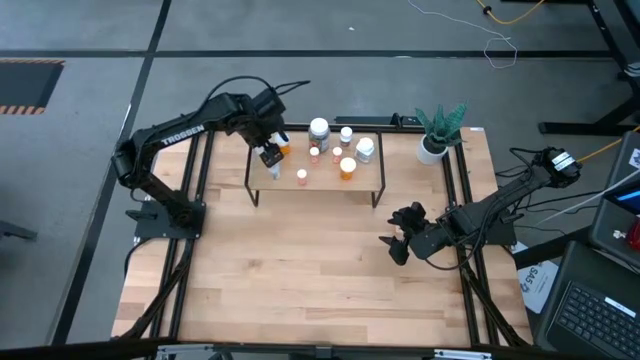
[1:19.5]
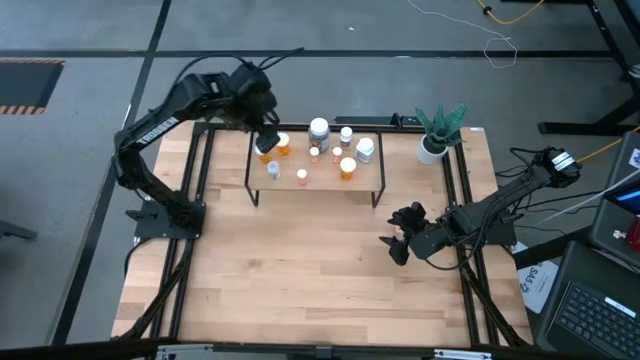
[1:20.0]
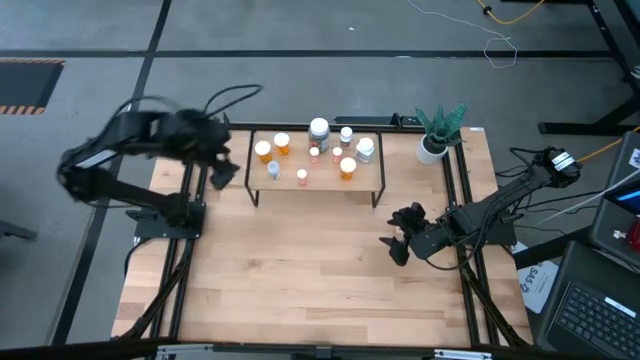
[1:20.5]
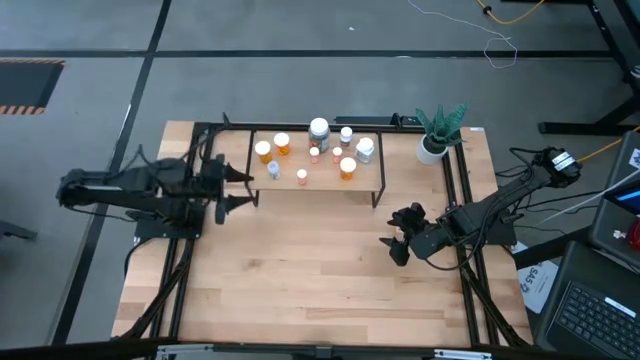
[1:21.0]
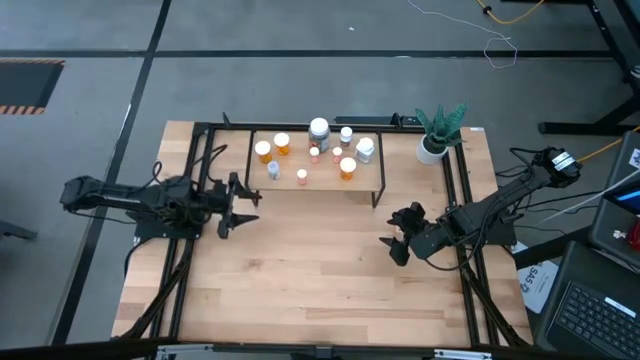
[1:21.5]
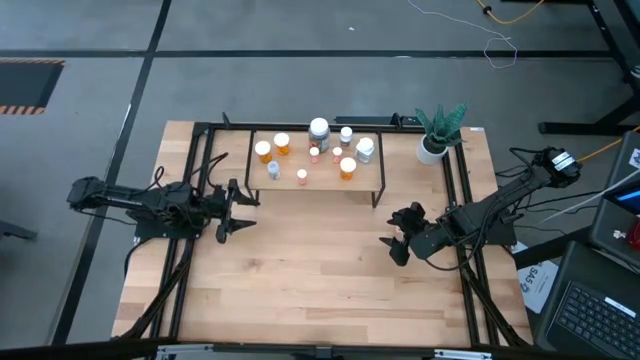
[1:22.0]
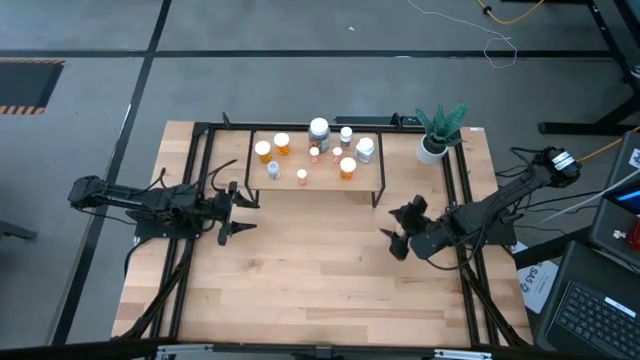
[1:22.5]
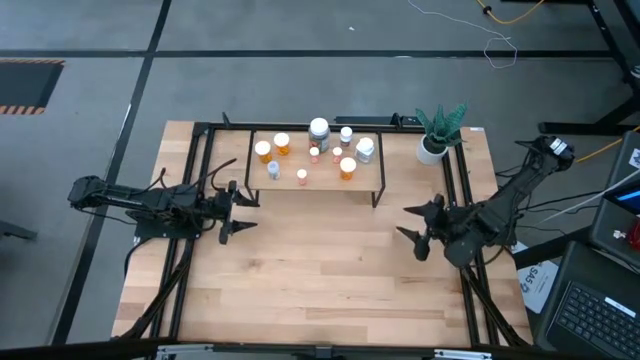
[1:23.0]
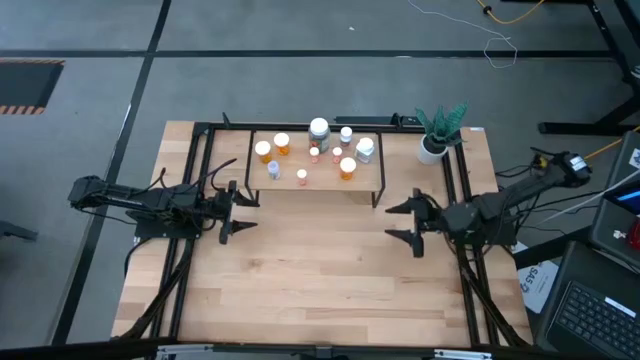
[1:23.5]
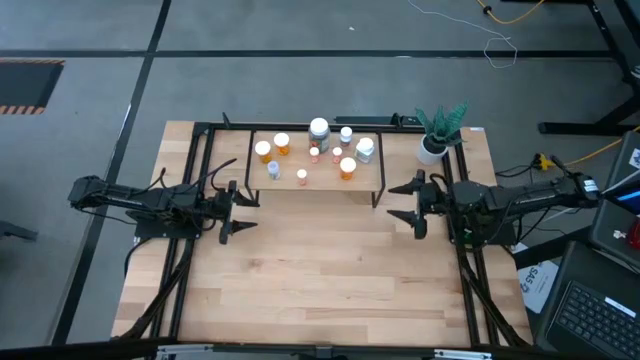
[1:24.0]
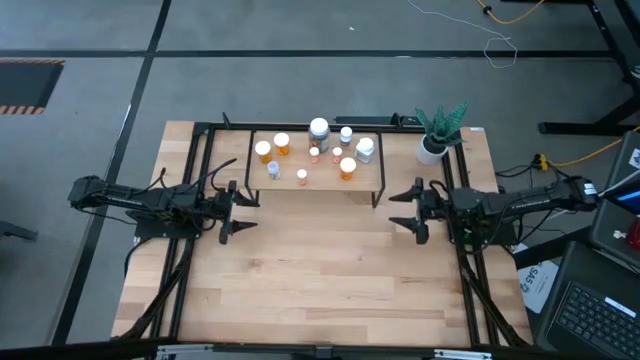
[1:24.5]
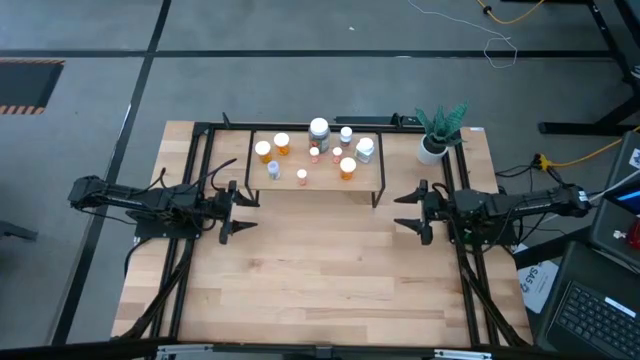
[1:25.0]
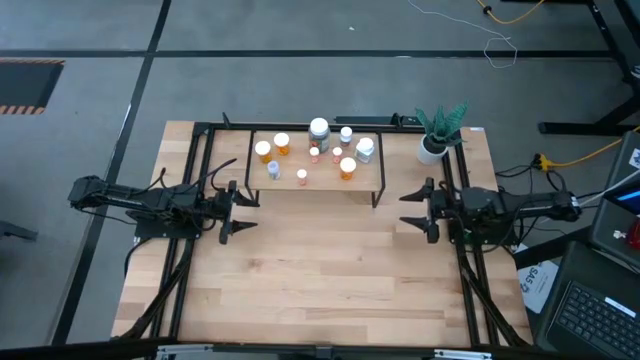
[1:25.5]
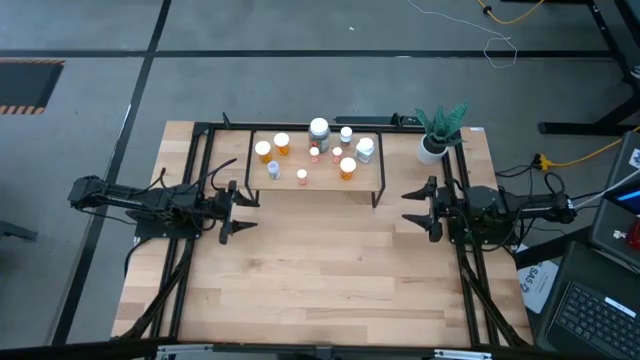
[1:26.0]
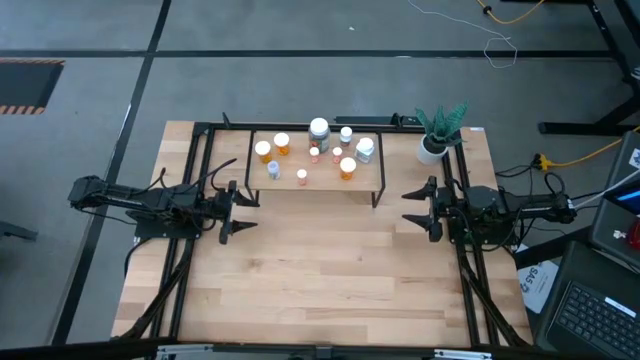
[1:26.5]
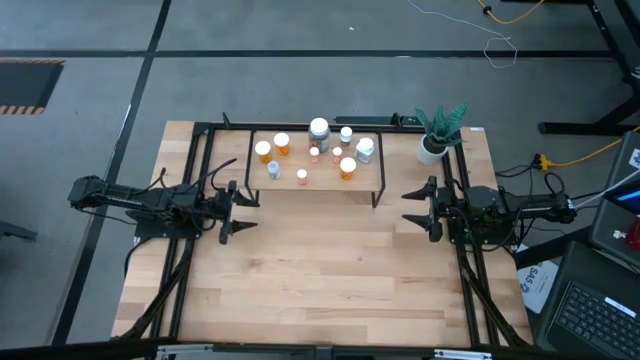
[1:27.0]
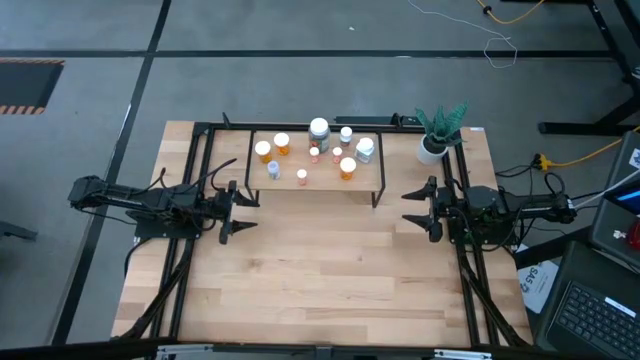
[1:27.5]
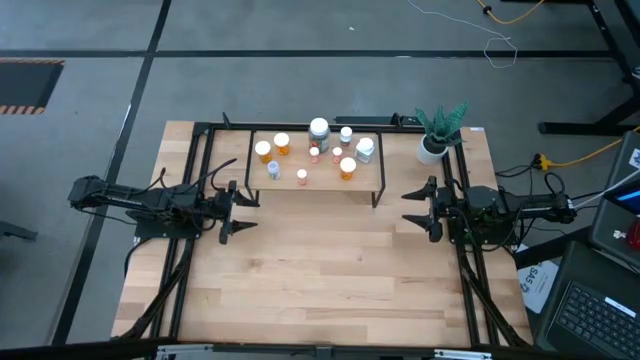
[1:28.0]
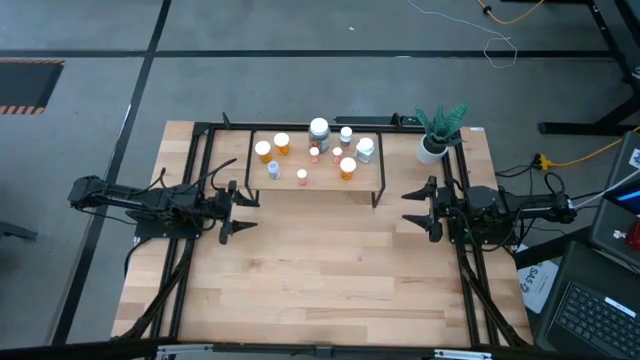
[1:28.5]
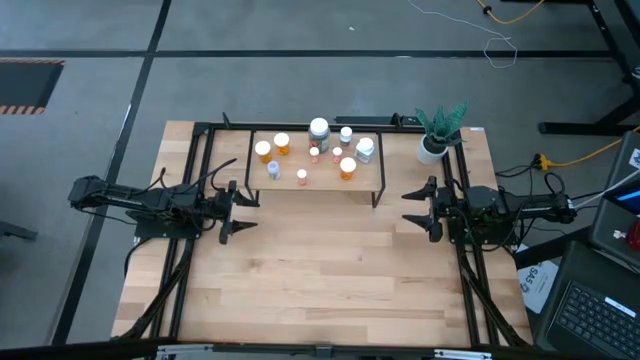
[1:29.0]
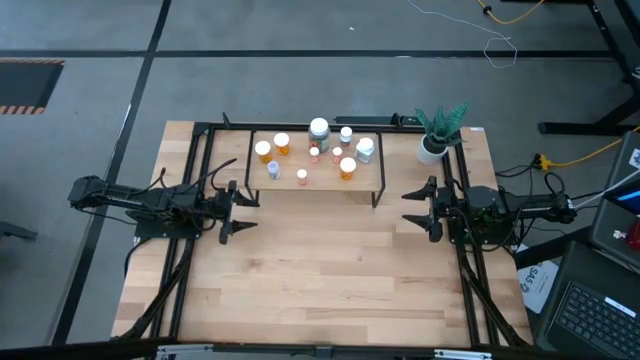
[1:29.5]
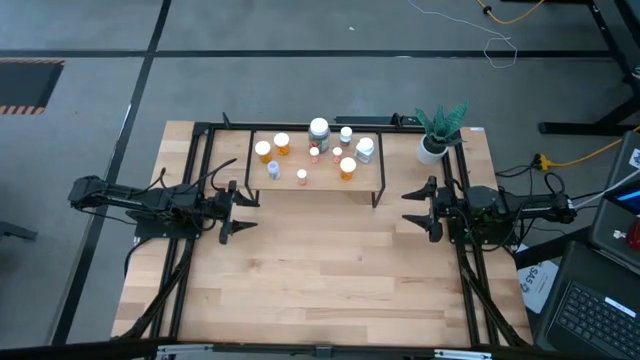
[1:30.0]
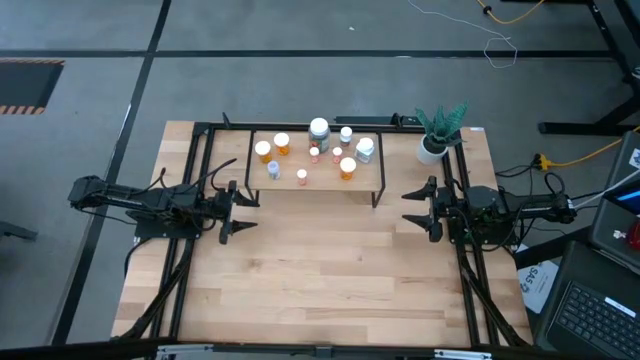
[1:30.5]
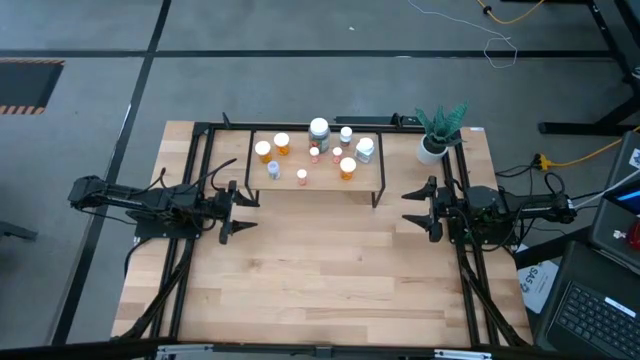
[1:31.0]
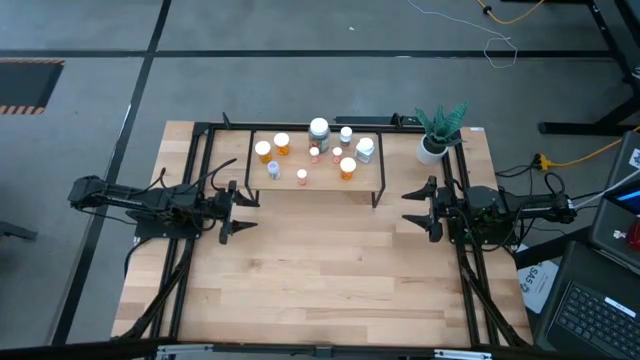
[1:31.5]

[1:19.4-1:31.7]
Task: Pick and place medicine bottles onto shelf by color
Return to Home Position

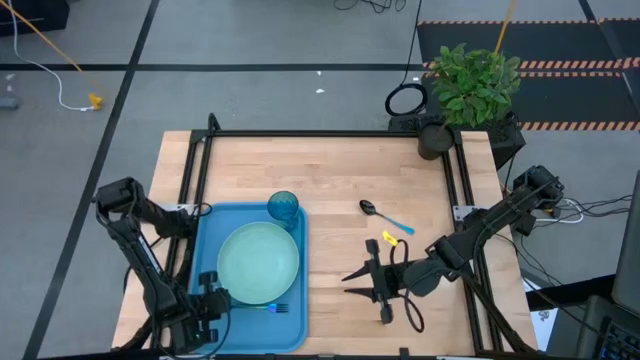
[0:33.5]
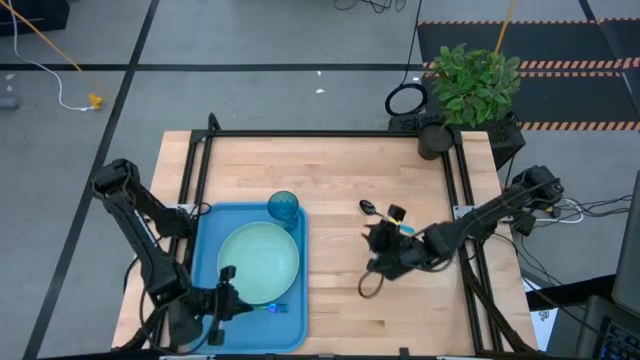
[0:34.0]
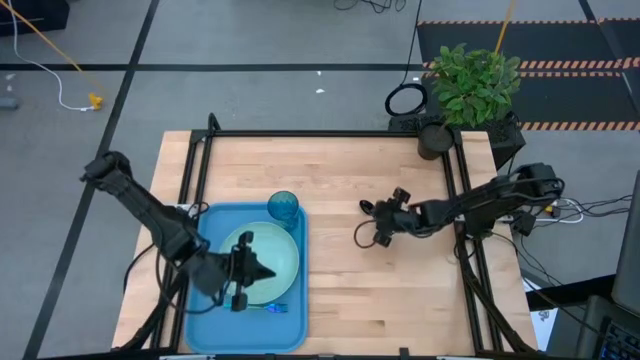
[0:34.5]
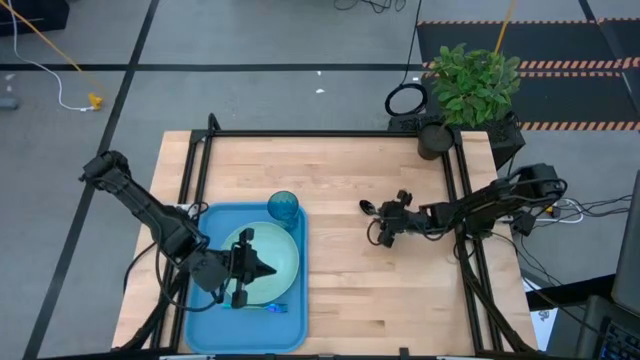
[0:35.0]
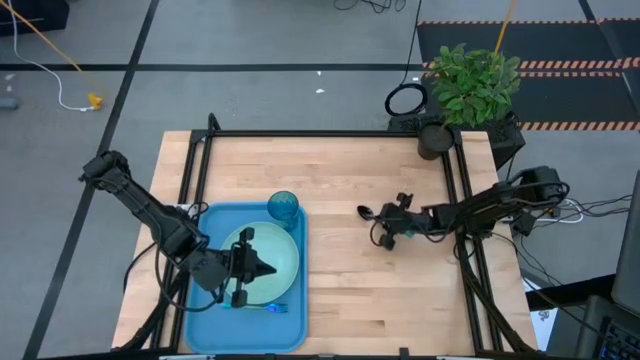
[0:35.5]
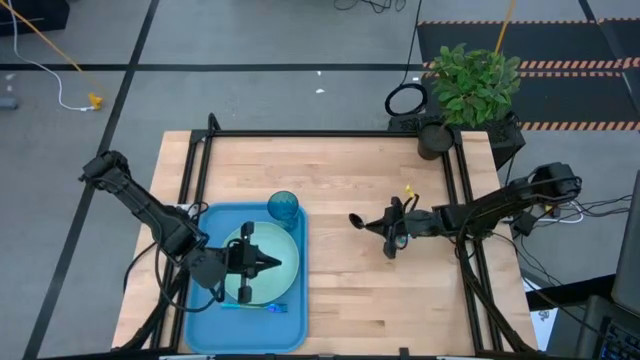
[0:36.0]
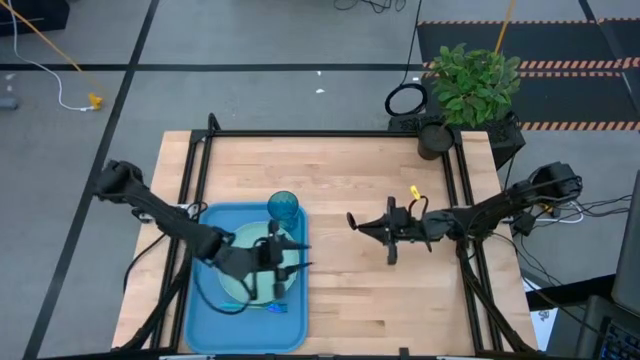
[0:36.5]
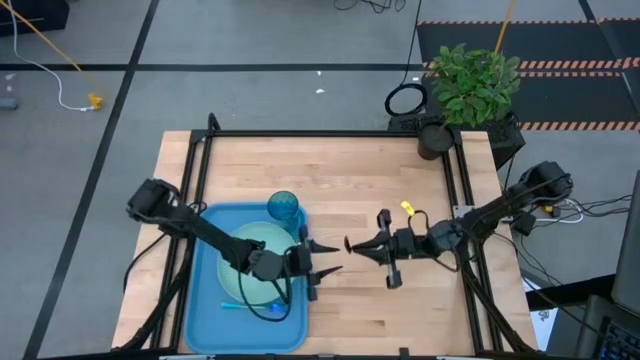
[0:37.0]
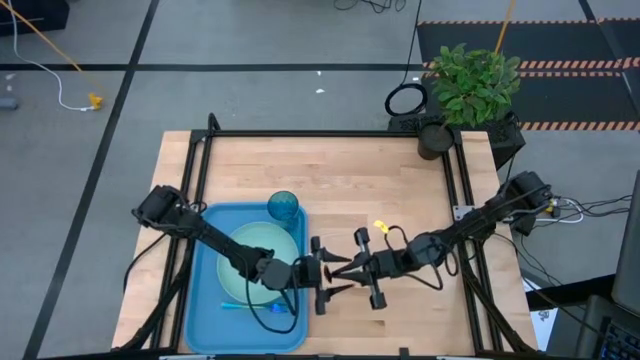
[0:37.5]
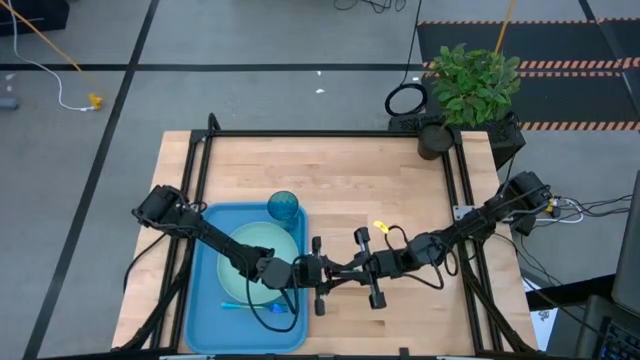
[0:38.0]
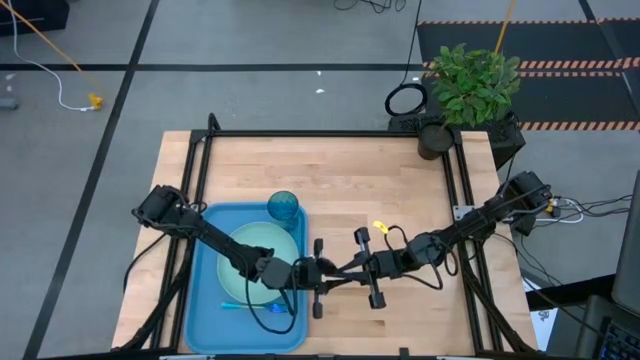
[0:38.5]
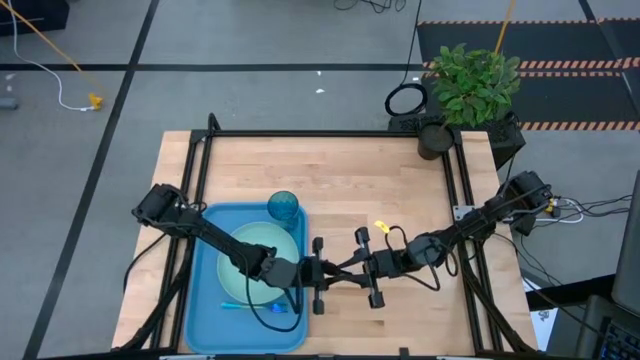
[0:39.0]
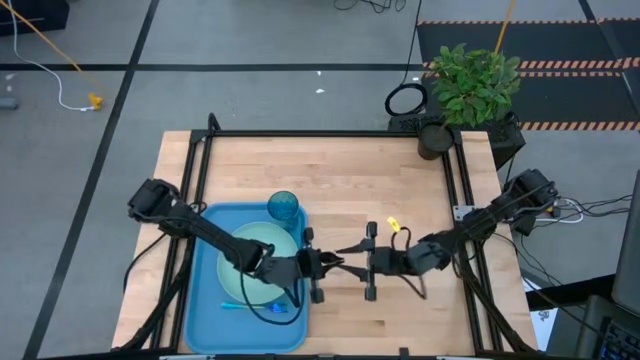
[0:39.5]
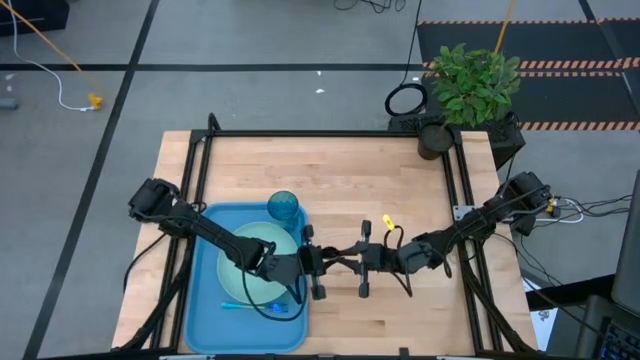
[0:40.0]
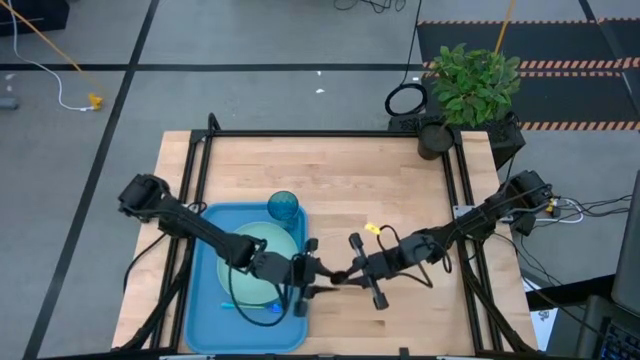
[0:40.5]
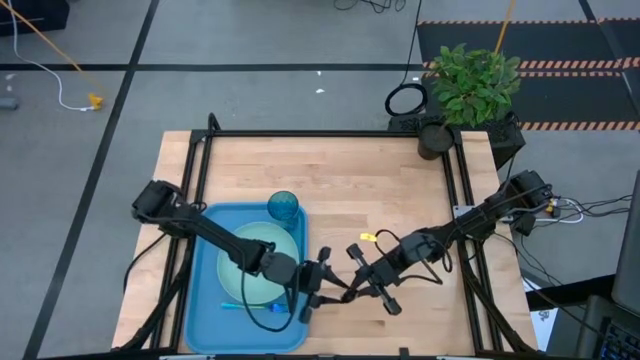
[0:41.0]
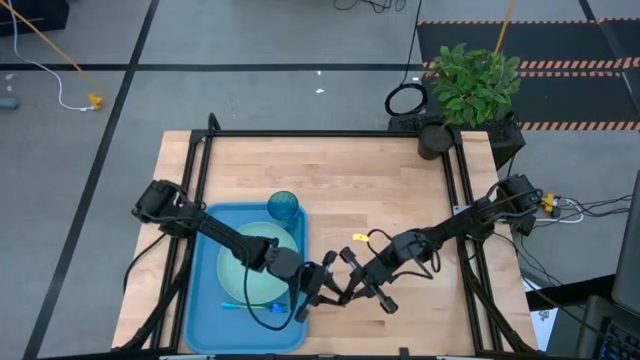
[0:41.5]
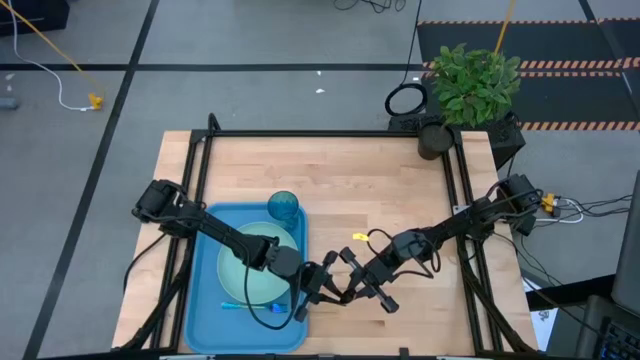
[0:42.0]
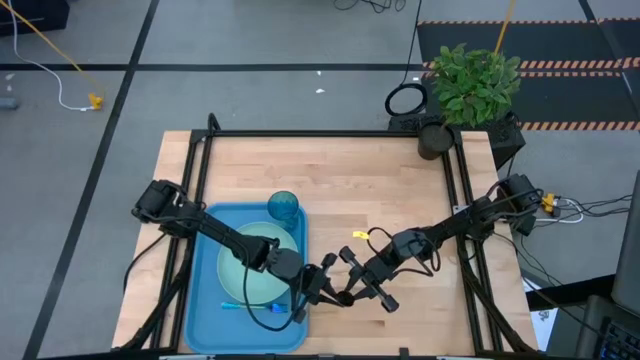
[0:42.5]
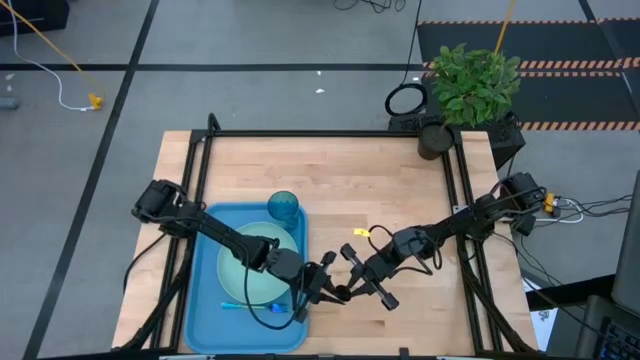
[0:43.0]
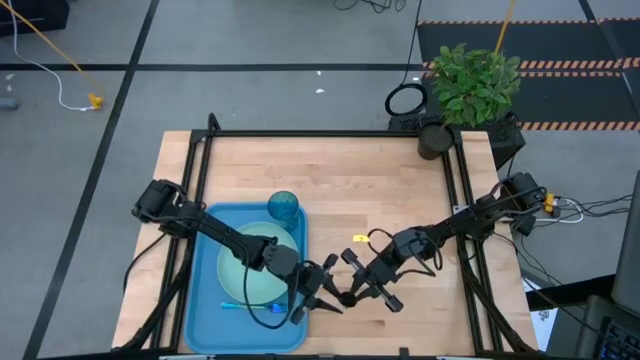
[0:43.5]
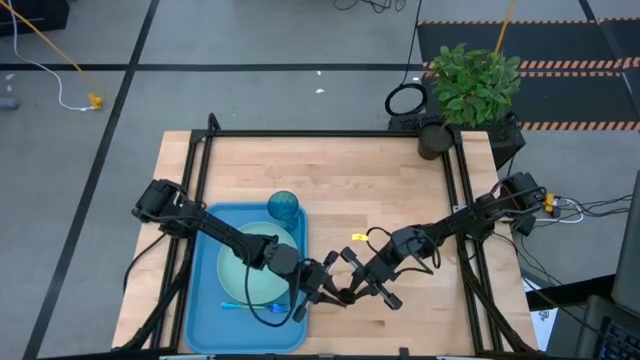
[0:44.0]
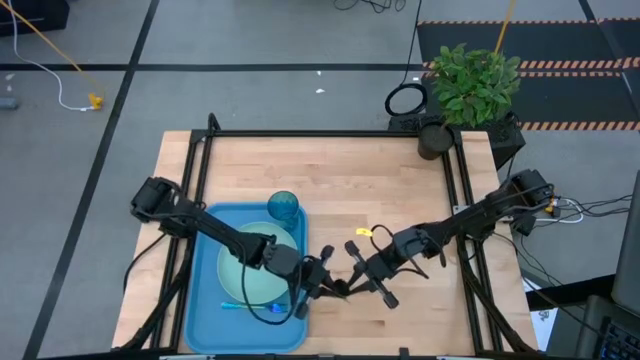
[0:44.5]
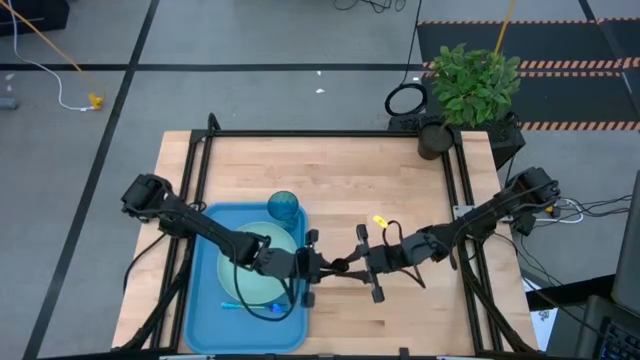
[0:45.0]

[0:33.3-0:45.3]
Task: Pick and place plate/cup/fork/spoon on tray
Put the black spoon on the blue tray to the bottom of the blue fork
